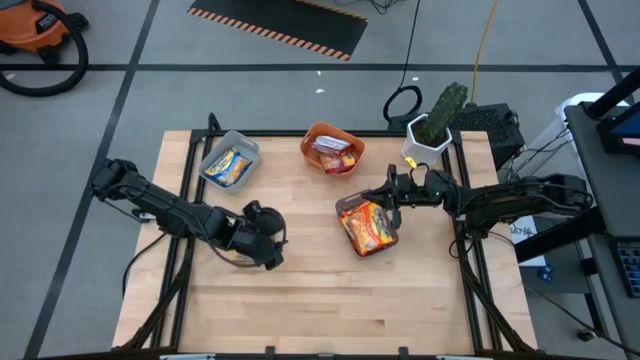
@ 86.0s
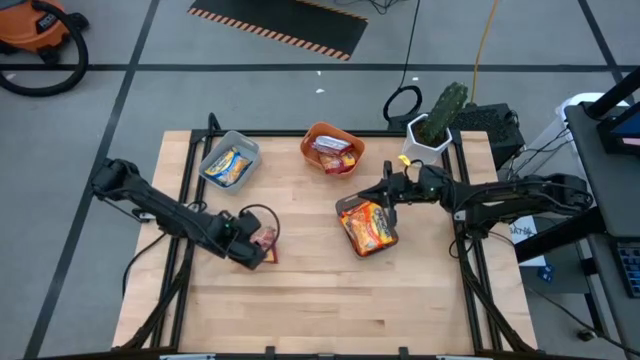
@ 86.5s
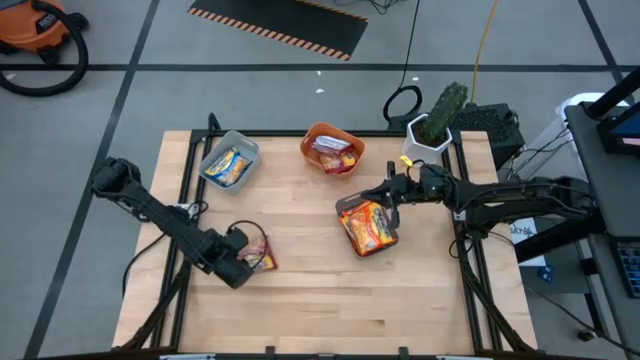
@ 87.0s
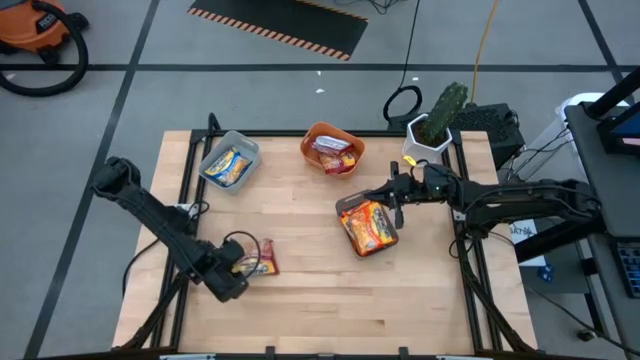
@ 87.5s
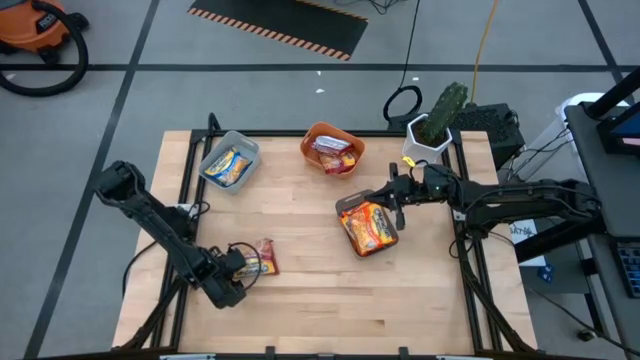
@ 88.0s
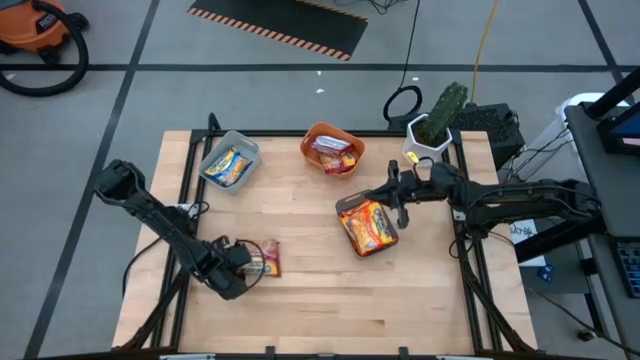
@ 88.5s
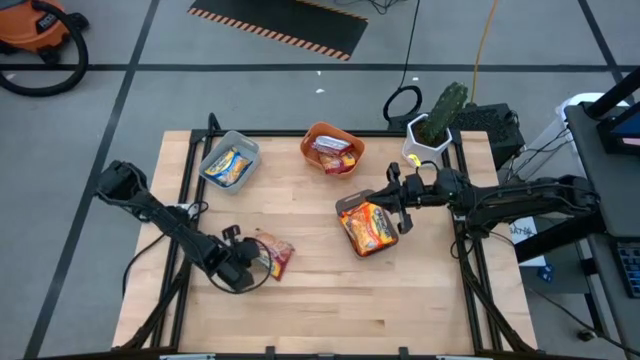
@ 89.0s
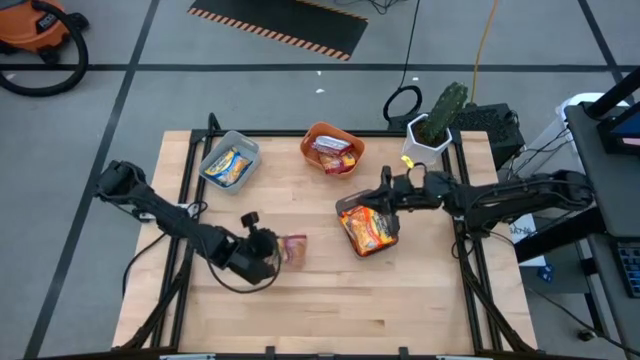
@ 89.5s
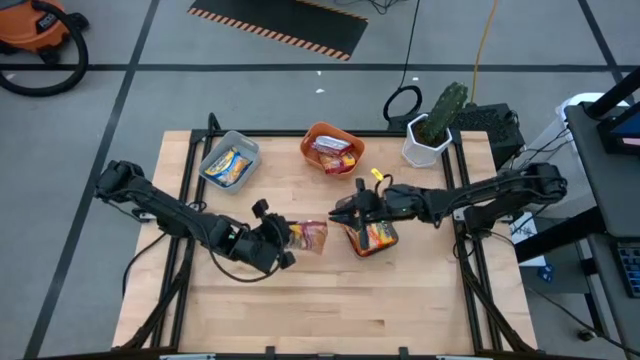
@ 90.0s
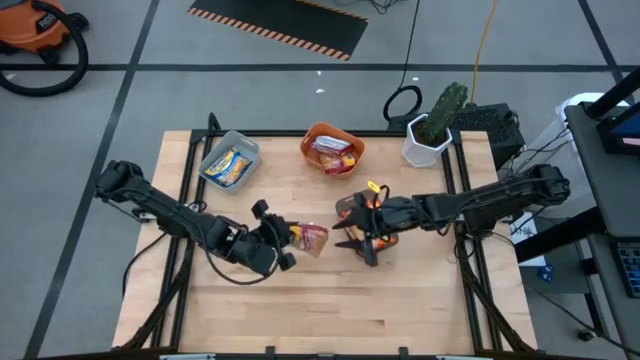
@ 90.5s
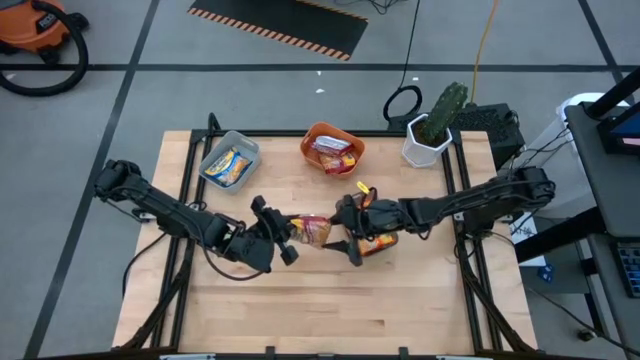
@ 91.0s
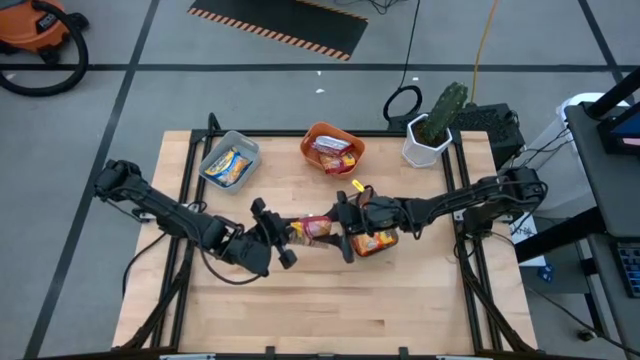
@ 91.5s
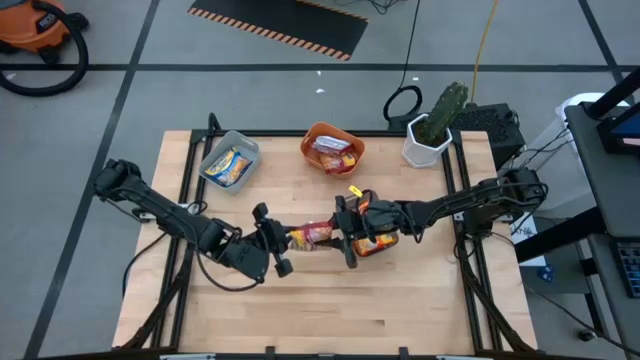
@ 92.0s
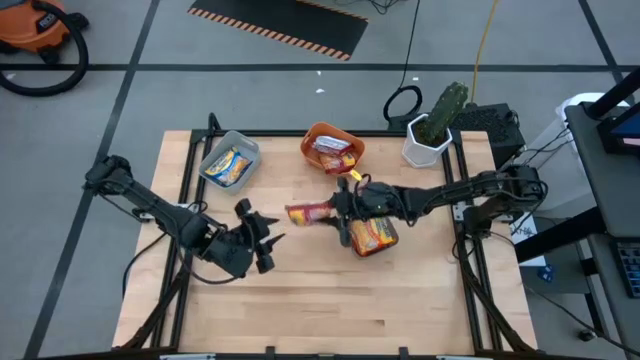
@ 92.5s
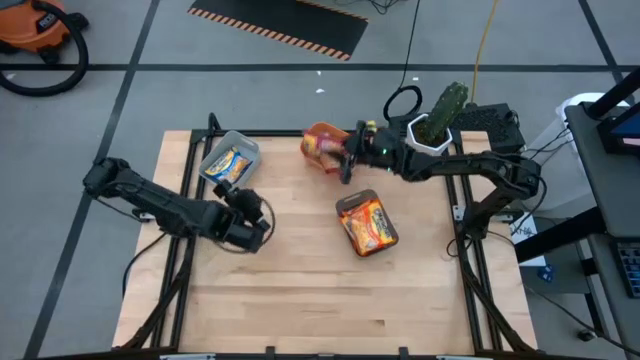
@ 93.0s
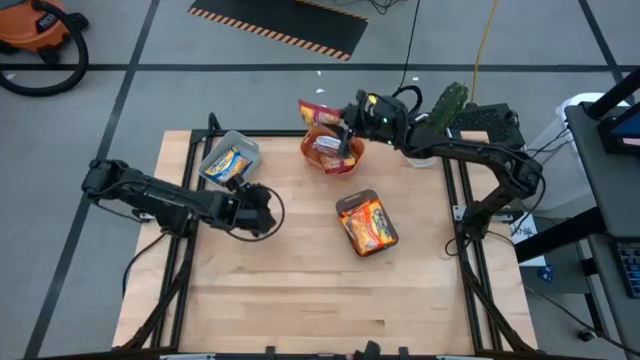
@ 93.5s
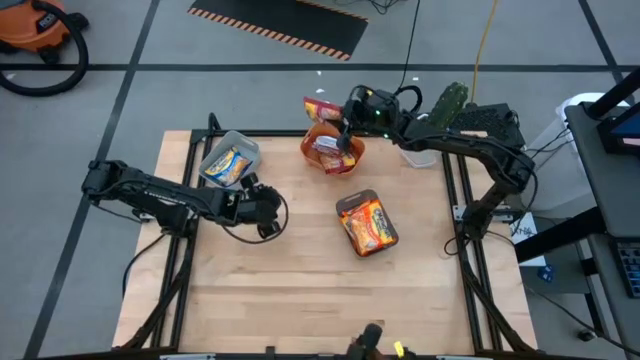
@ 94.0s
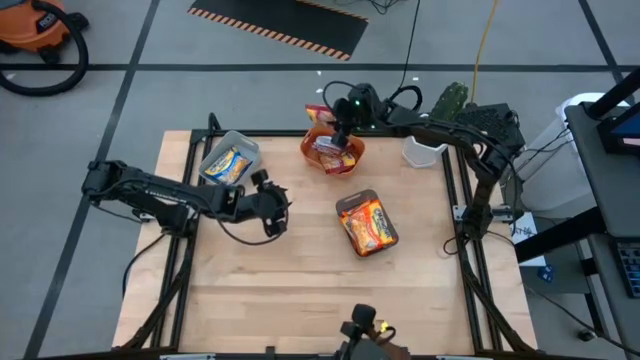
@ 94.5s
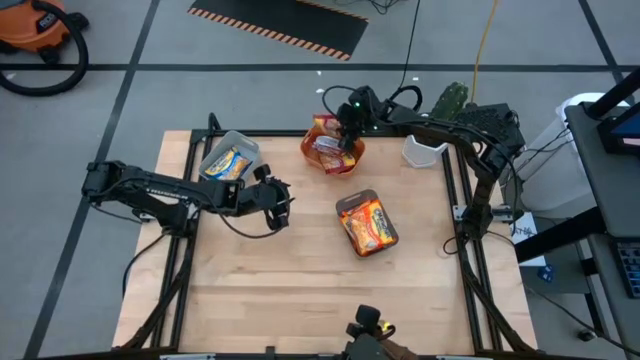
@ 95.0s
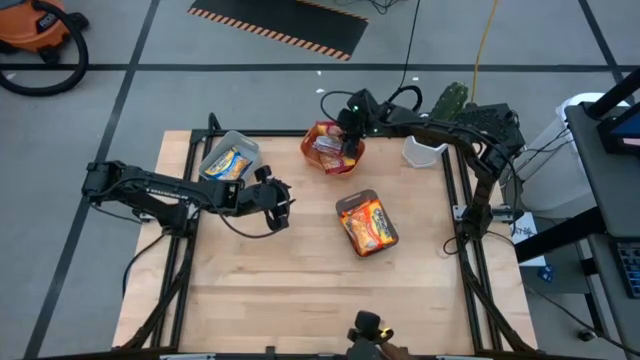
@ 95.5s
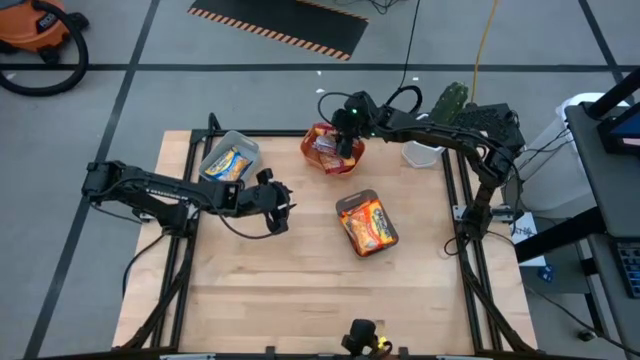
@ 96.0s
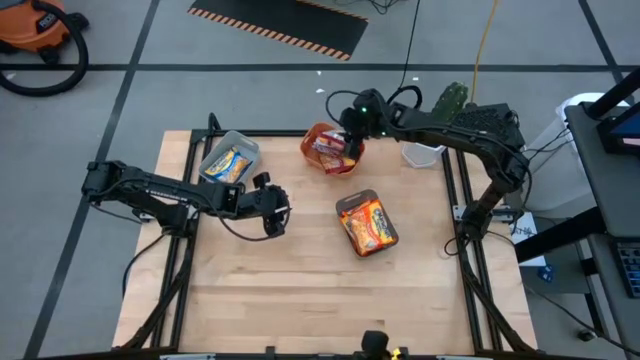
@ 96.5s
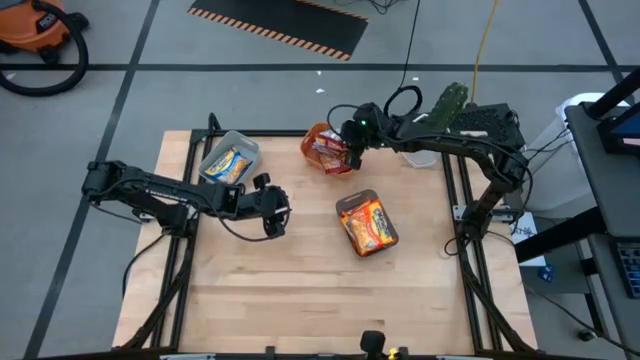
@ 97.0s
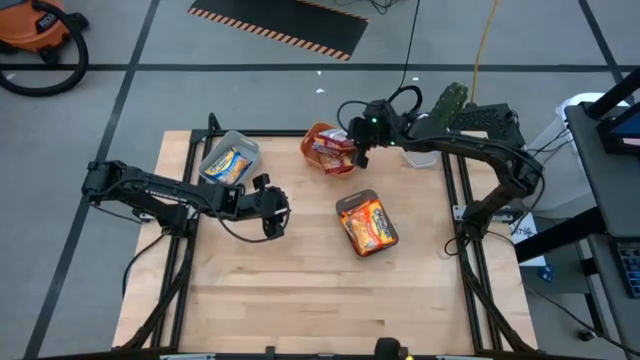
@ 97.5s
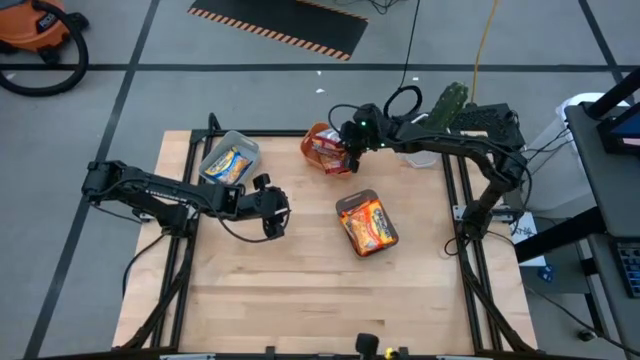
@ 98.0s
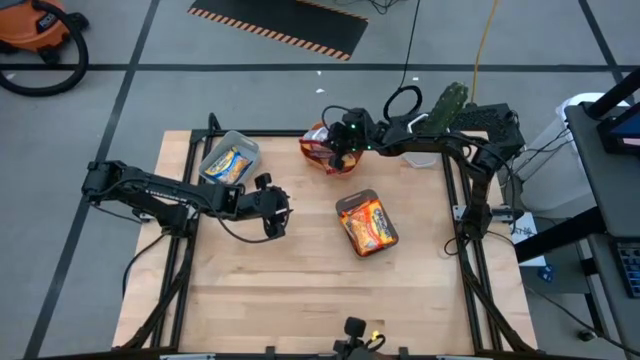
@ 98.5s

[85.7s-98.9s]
Task: Sort Maruchan noodles
Put the red noodle pack into the orange bin

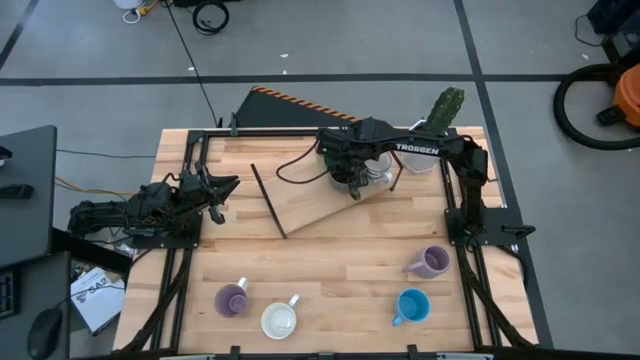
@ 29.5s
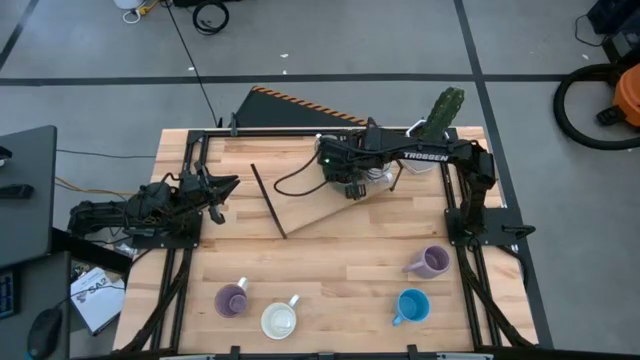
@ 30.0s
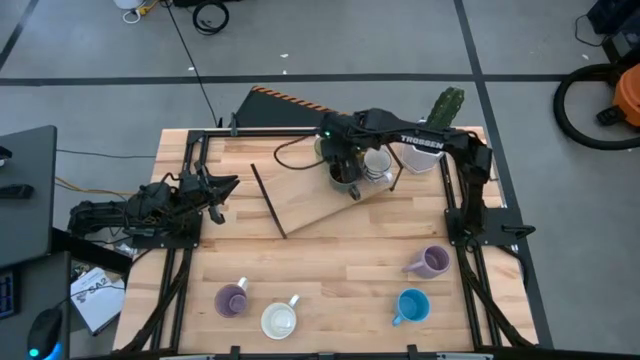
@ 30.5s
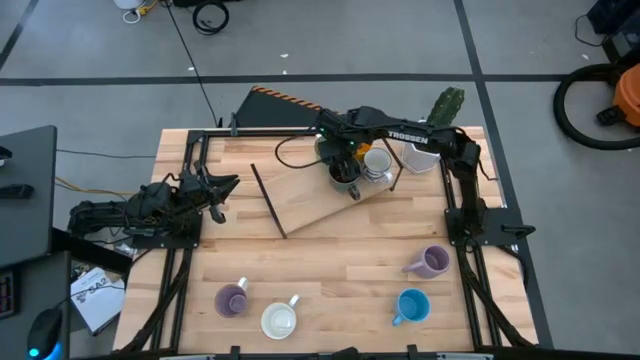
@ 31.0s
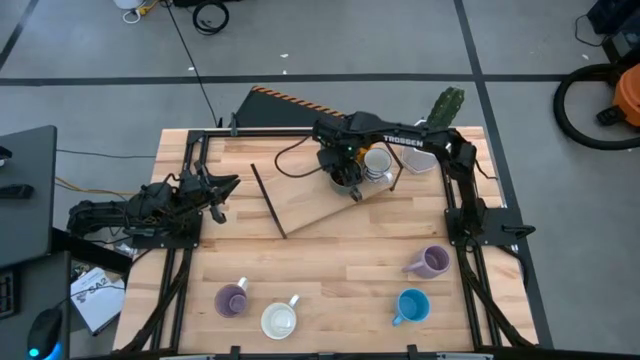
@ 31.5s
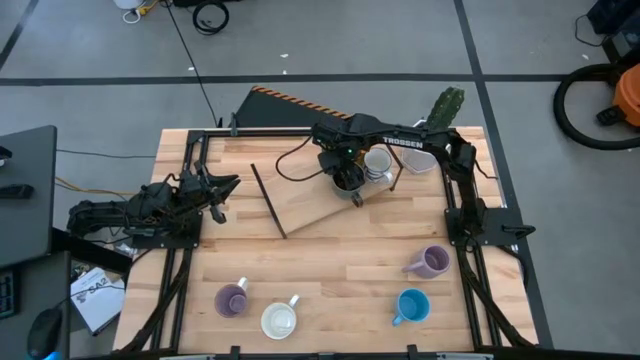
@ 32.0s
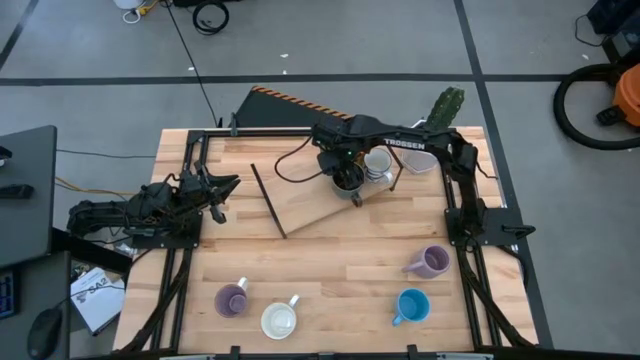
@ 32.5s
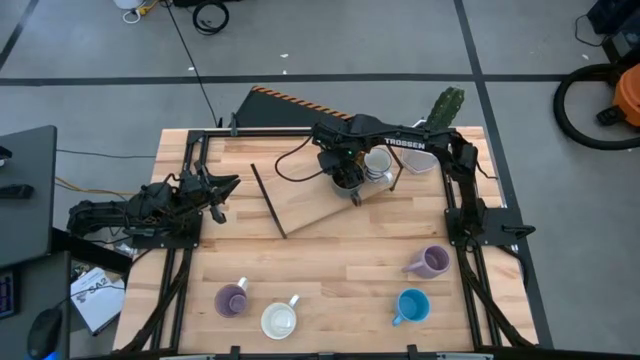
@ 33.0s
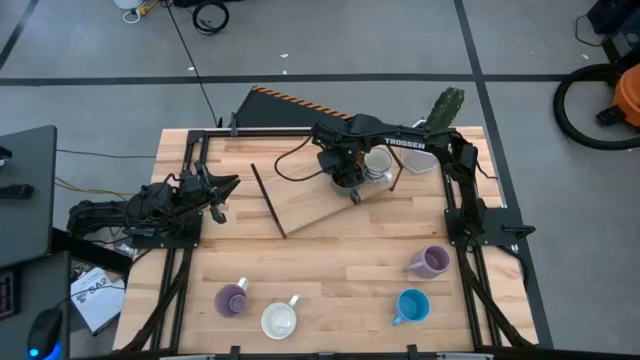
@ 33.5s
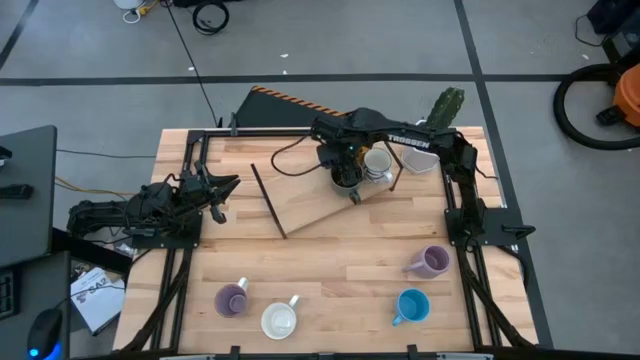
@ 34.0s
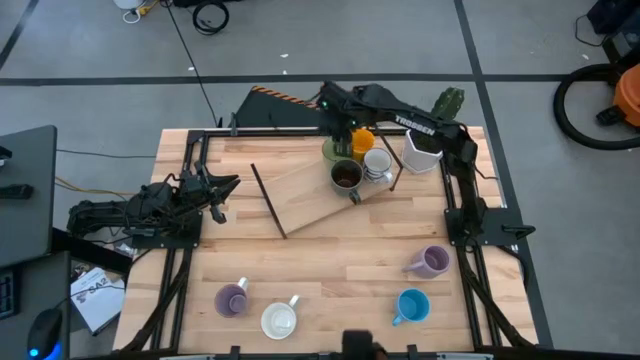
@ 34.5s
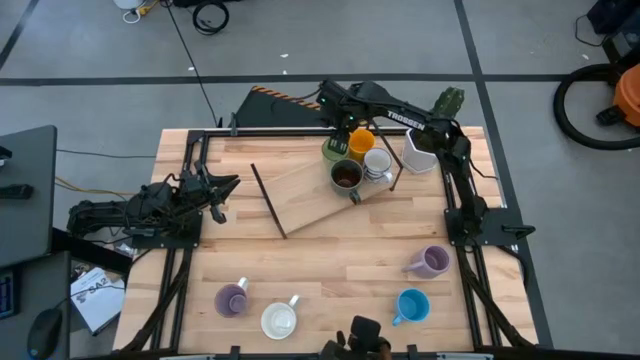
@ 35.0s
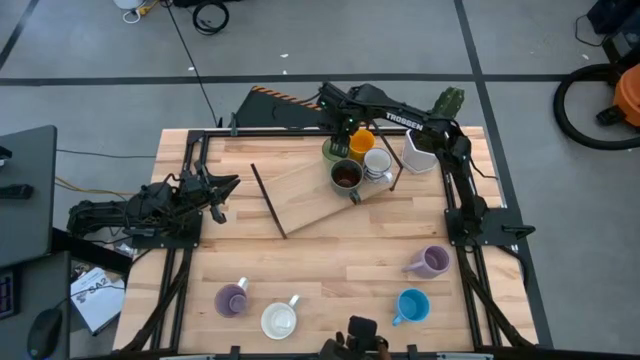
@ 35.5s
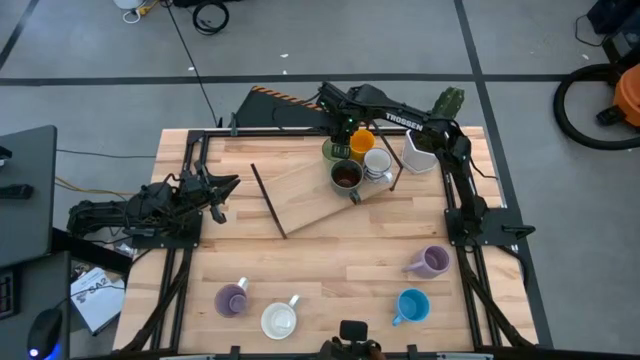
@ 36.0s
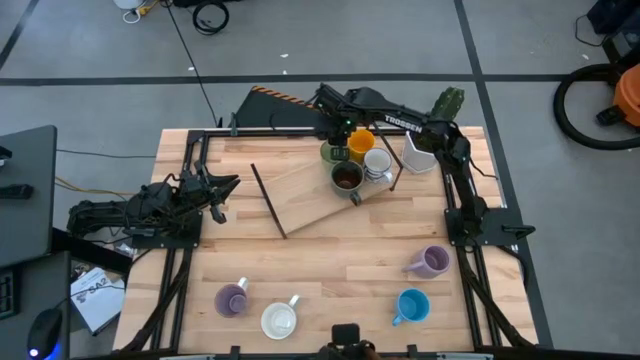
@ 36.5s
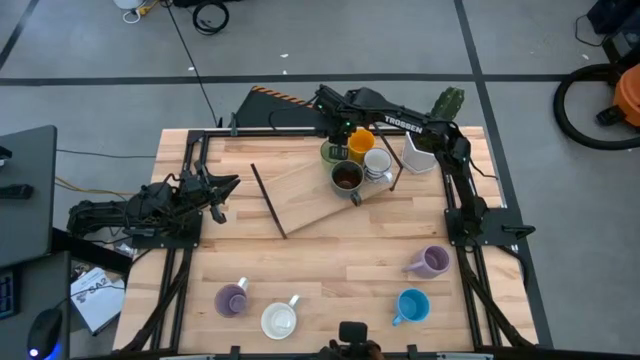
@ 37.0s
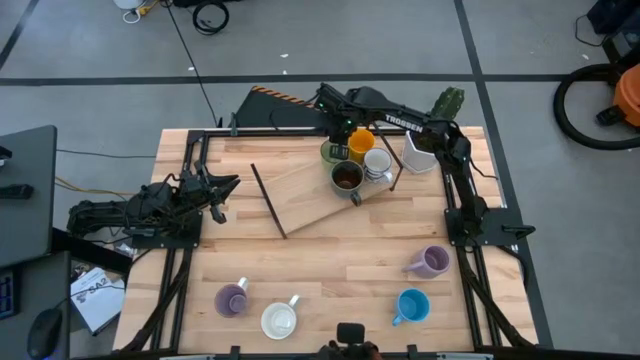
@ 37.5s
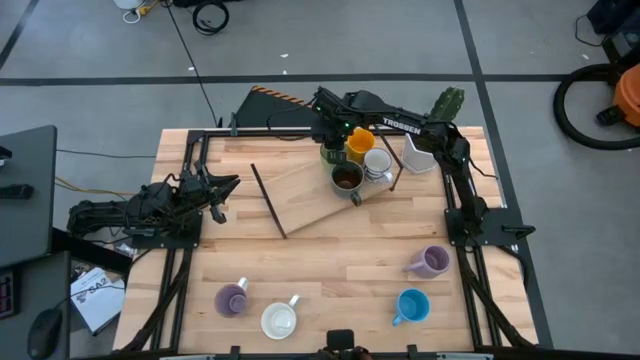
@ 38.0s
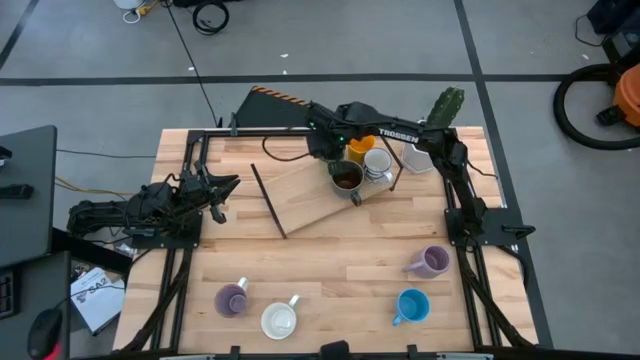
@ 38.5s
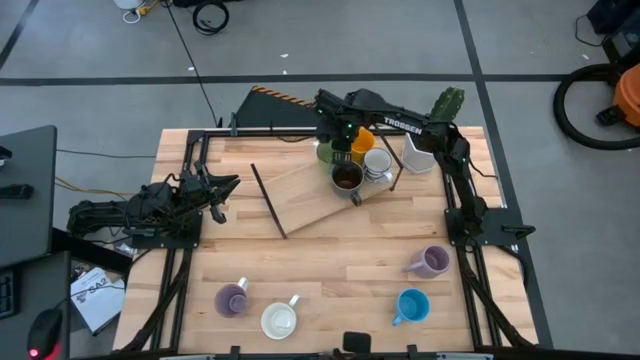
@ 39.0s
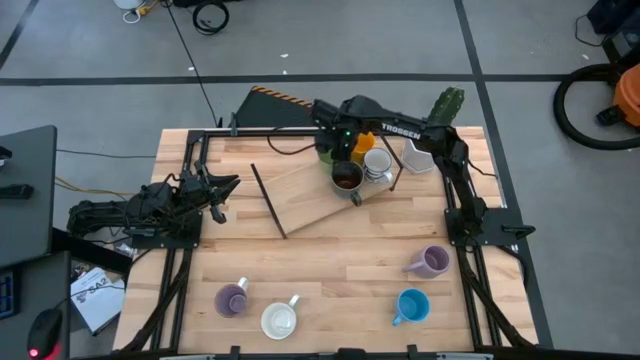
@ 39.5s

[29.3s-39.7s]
Task: Place coffee mugs
Adjust the mugs on the shelf
